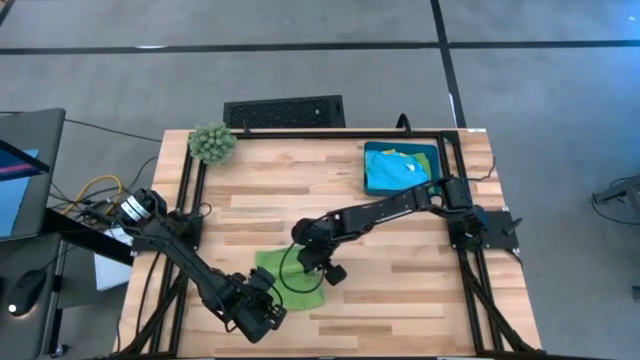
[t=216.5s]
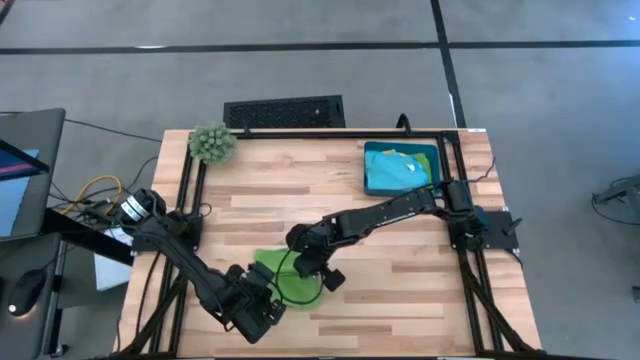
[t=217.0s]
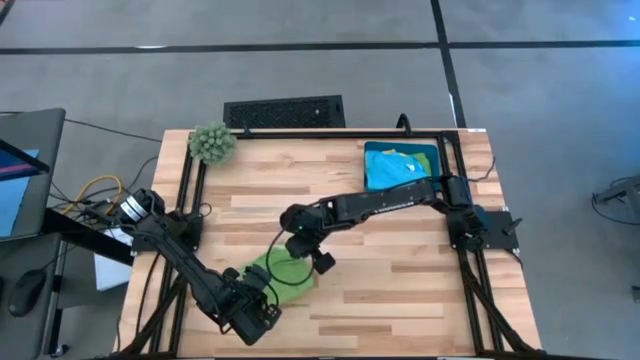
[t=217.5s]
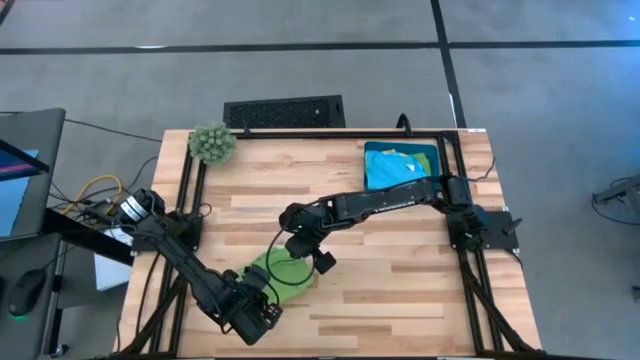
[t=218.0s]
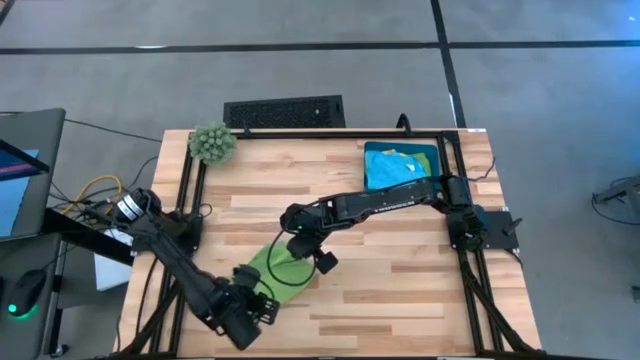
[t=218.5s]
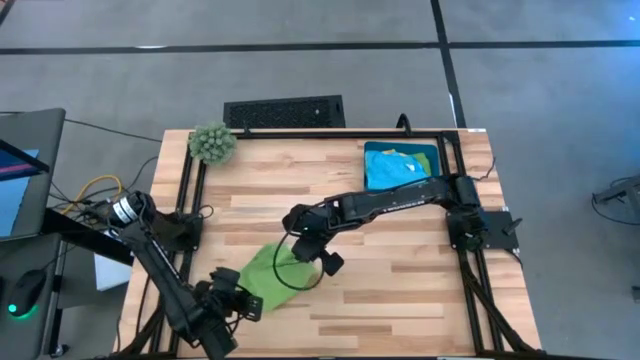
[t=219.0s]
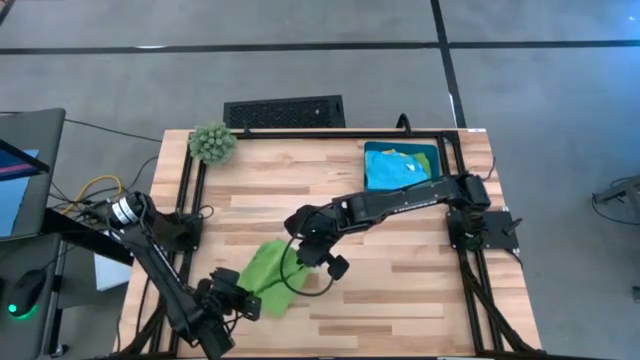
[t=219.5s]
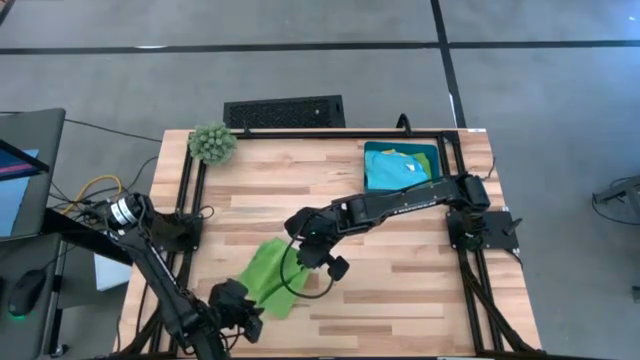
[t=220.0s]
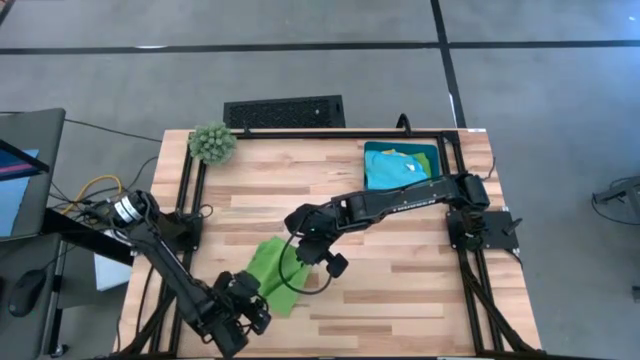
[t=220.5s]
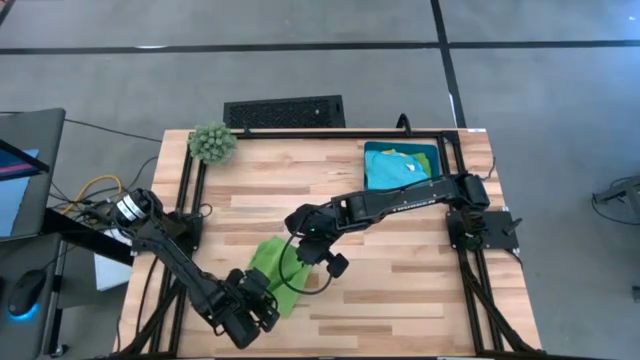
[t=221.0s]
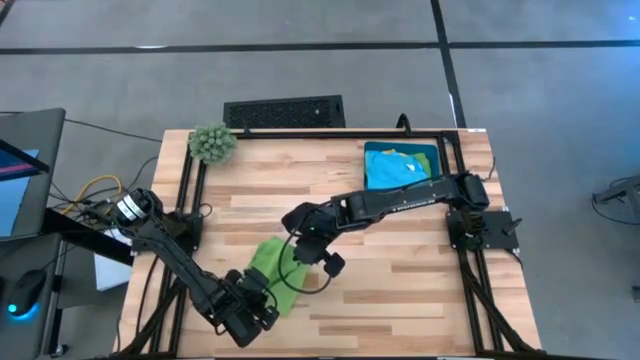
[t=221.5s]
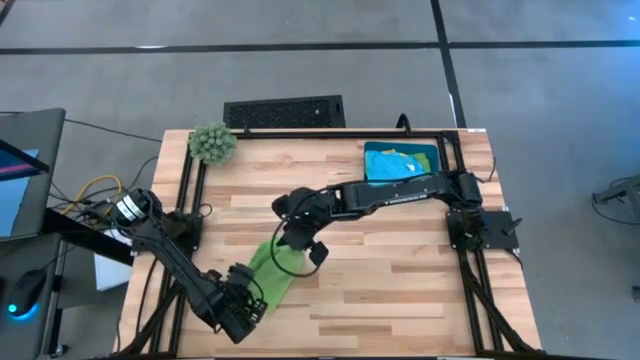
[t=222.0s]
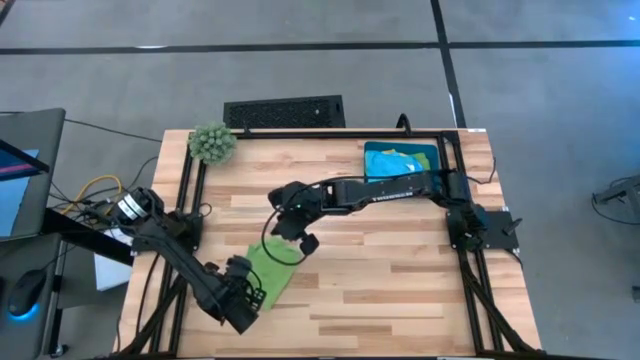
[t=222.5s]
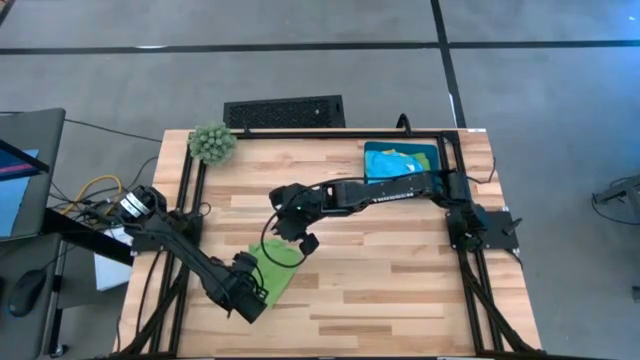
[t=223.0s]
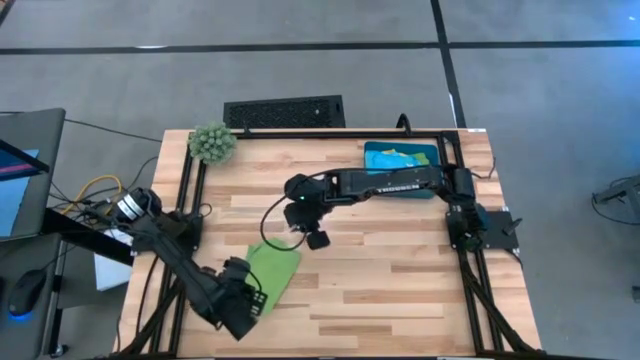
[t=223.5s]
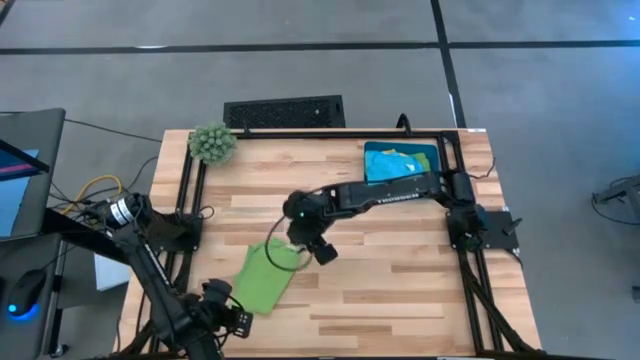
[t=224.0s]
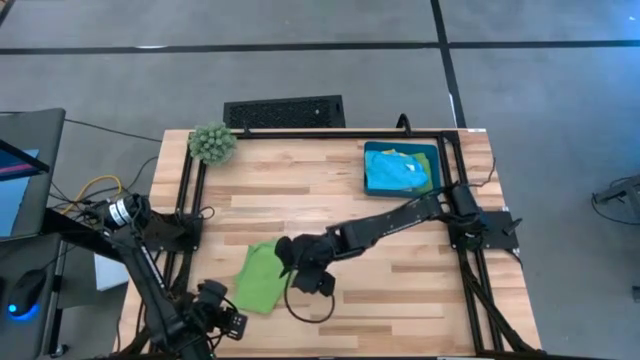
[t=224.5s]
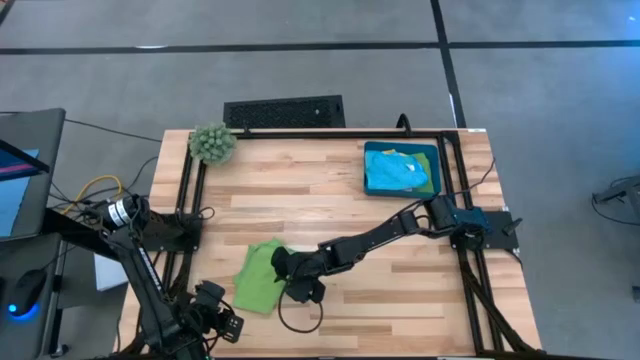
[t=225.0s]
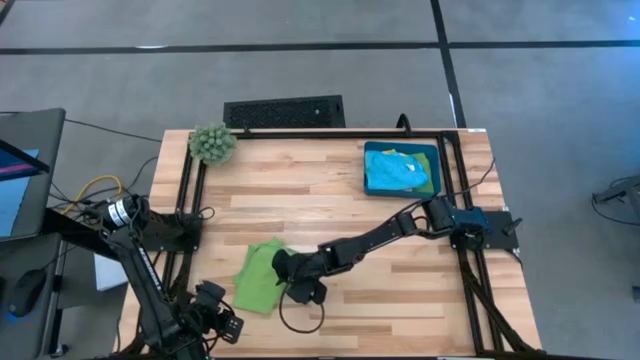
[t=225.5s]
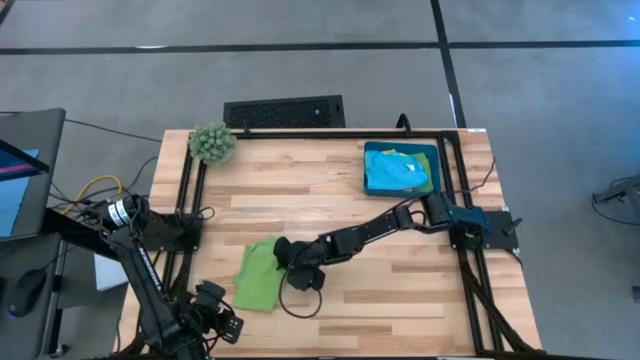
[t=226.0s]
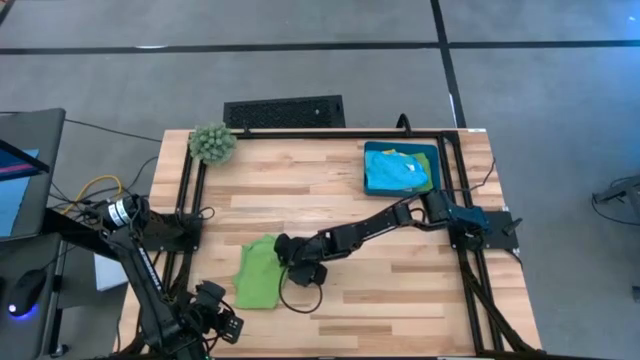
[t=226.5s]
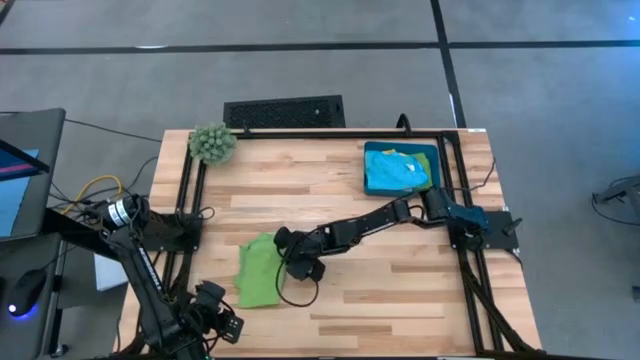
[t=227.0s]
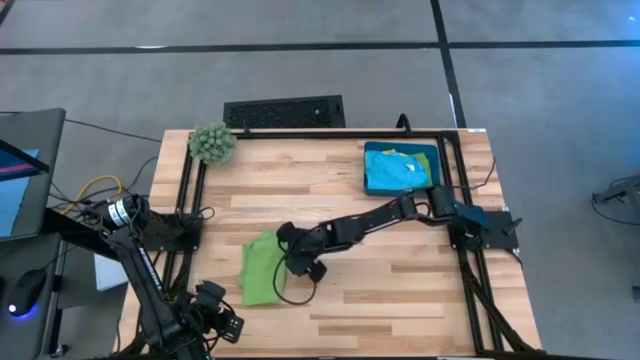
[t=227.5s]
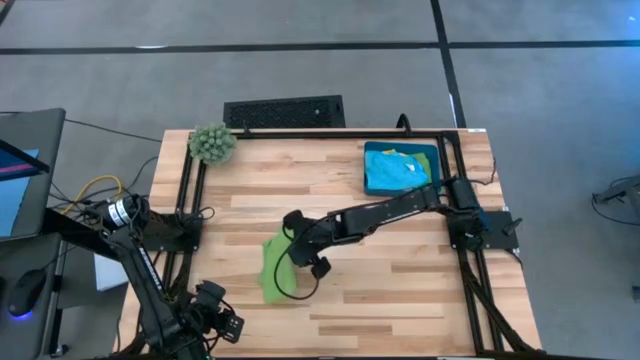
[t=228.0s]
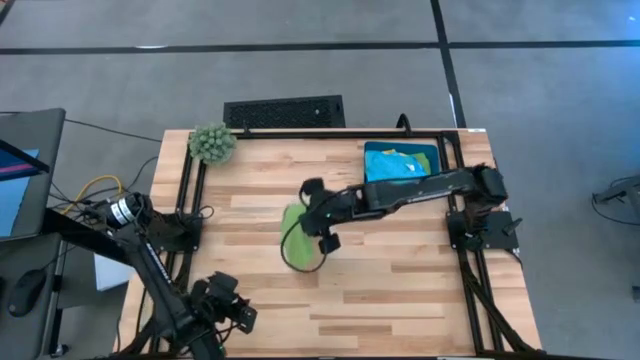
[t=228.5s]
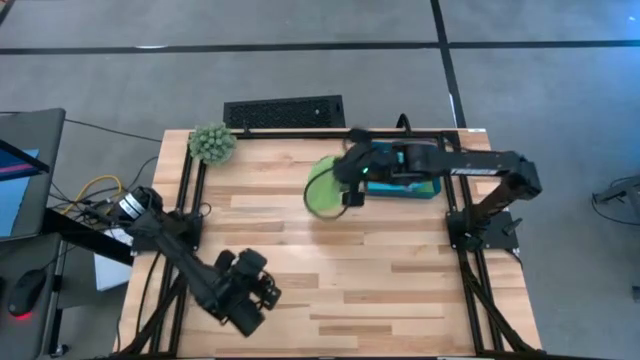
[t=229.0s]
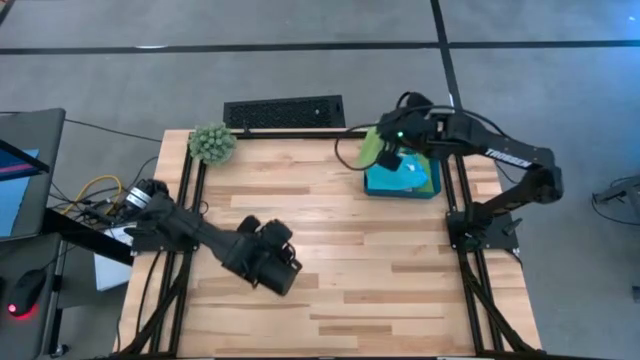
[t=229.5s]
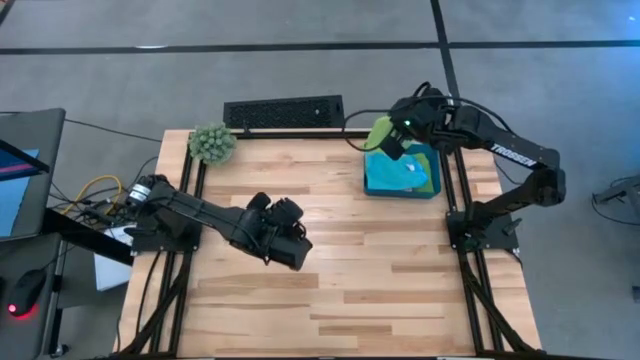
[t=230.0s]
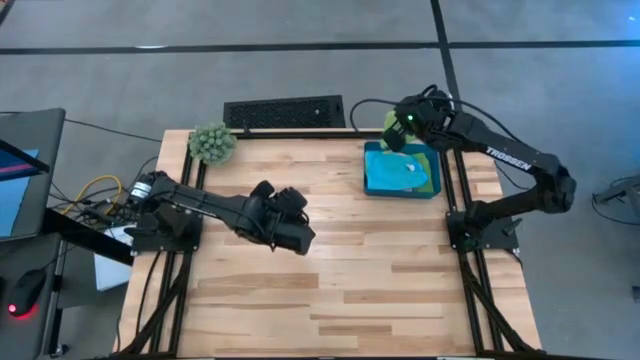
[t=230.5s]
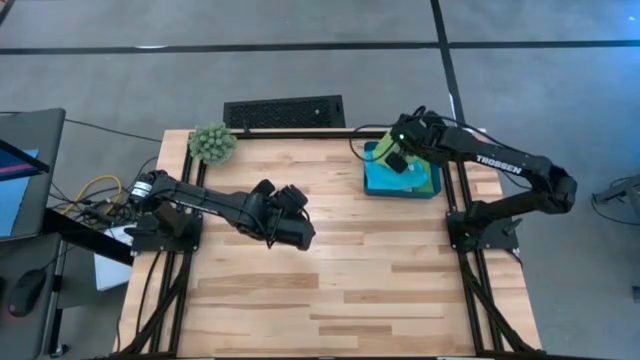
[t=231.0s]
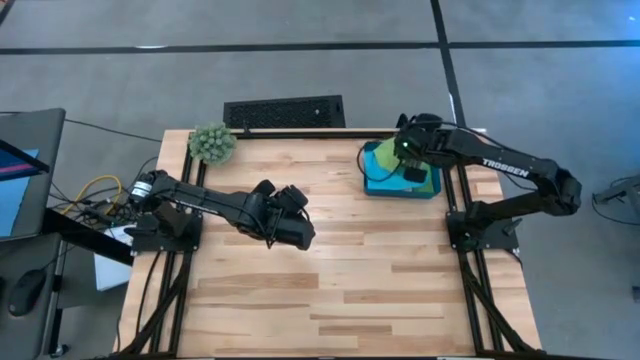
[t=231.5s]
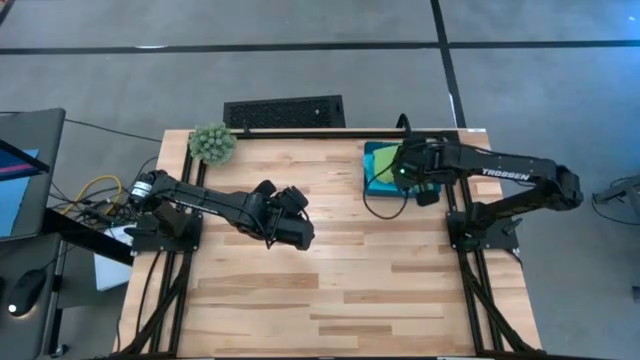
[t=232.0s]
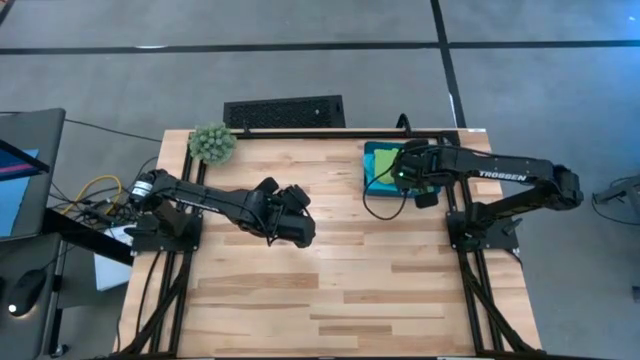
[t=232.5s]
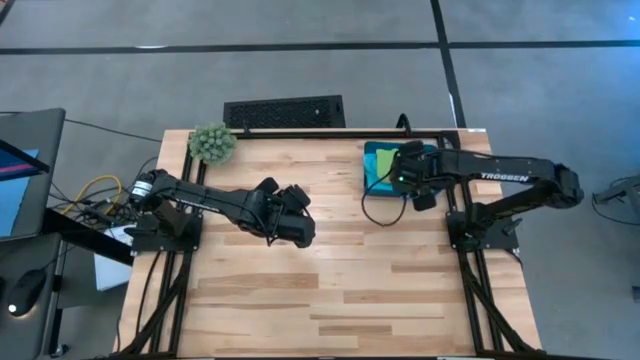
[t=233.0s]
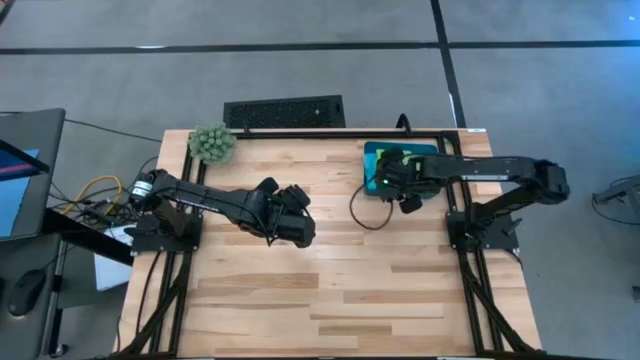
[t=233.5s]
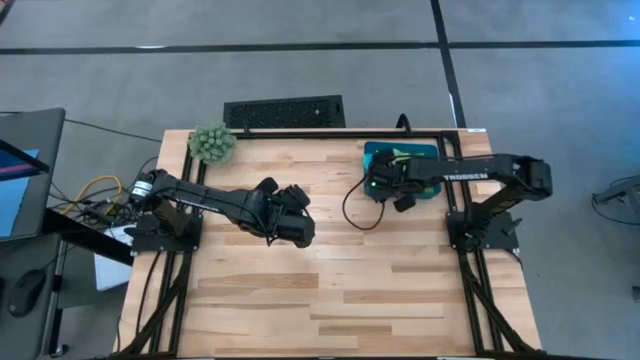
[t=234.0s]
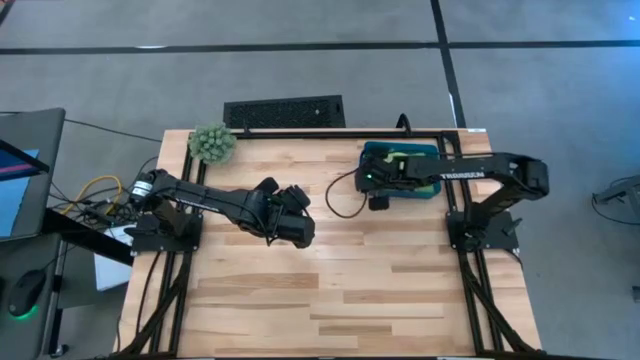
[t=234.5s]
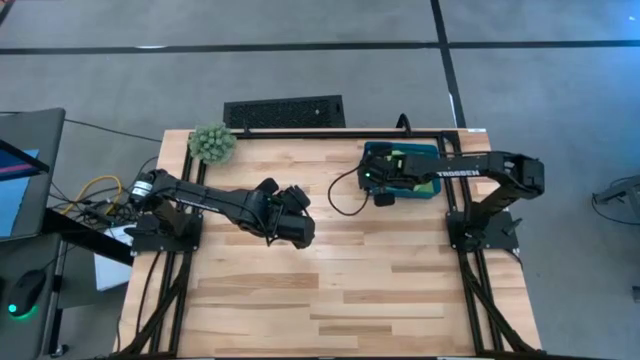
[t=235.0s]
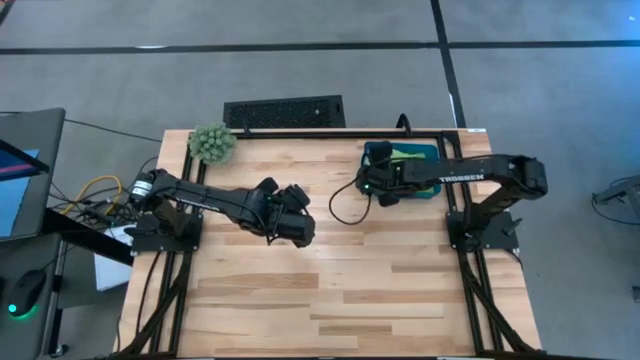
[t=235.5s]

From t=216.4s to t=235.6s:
Task: Fold microfiber towels
Fold the green microfiber cloth

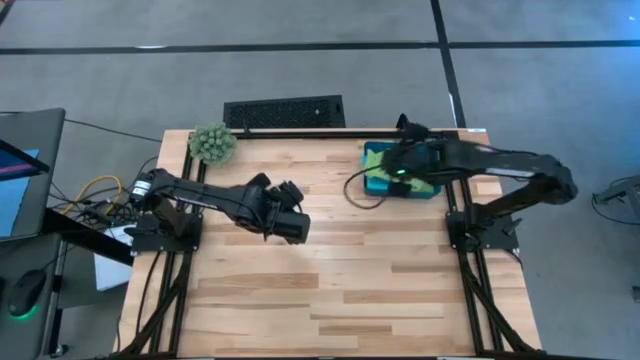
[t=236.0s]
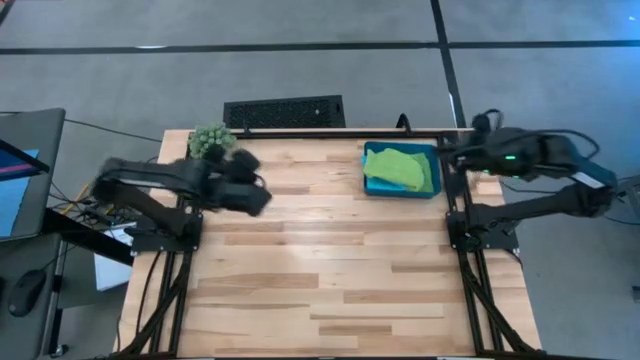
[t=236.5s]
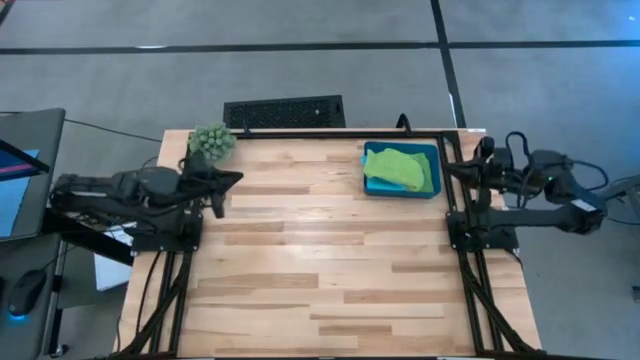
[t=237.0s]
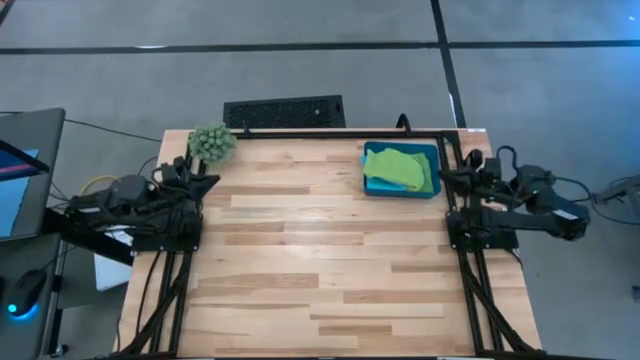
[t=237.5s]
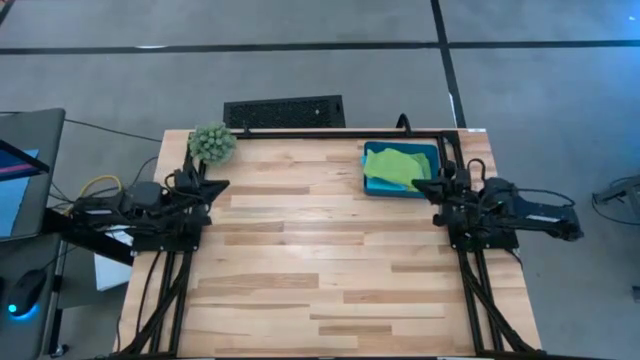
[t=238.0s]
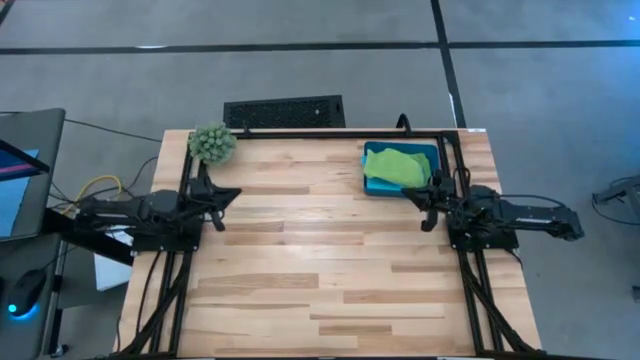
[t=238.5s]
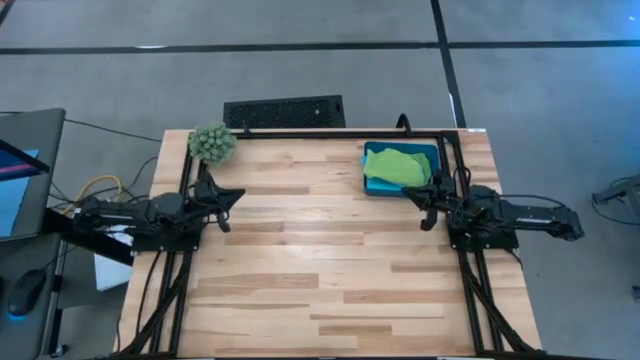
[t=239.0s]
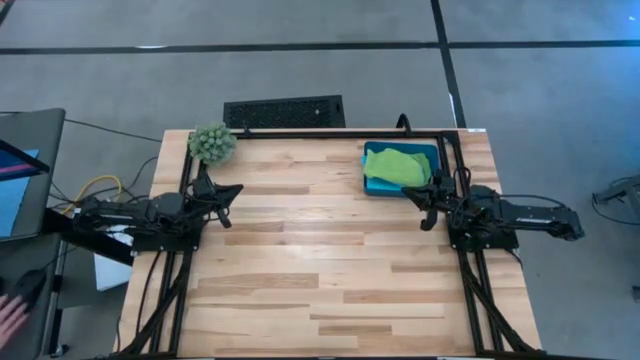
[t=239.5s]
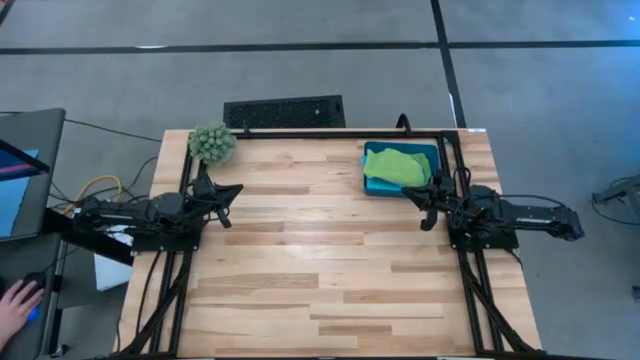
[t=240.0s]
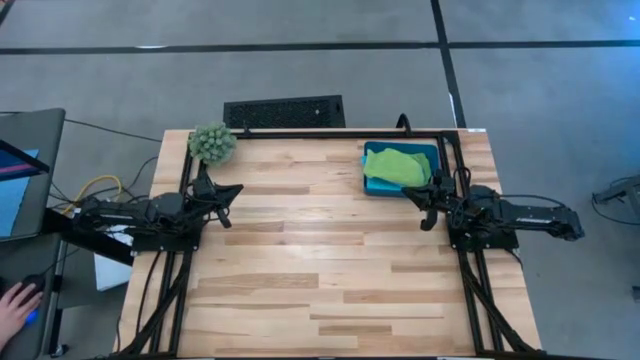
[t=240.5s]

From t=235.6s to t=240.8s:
Return to Home Position
